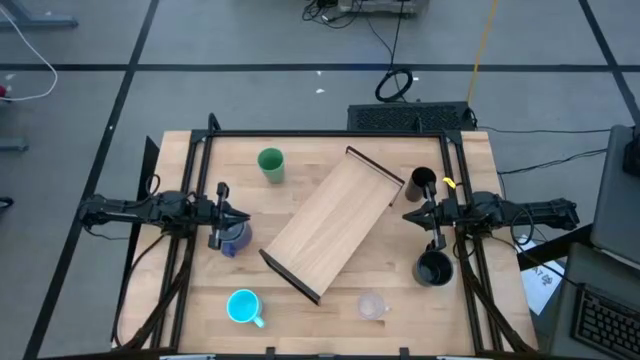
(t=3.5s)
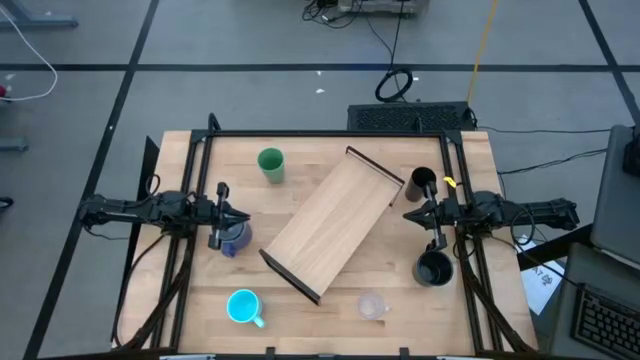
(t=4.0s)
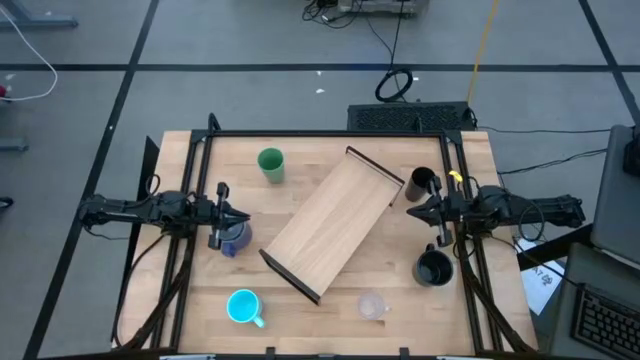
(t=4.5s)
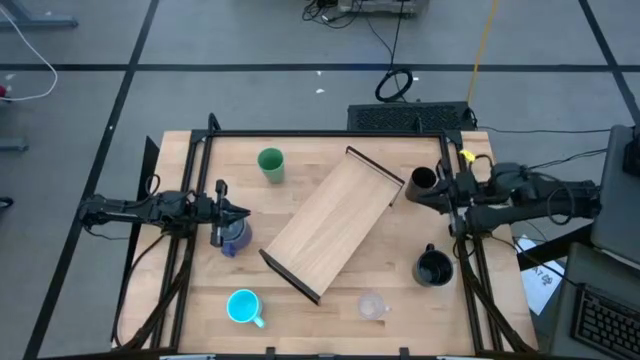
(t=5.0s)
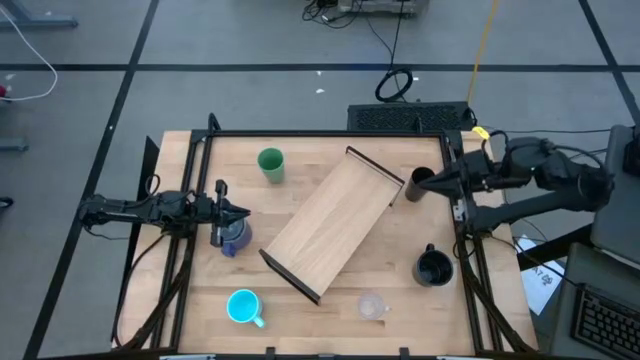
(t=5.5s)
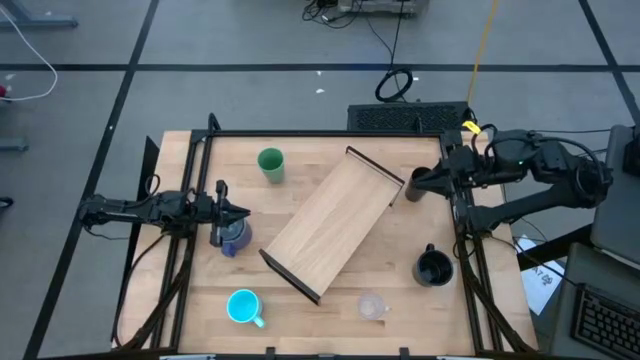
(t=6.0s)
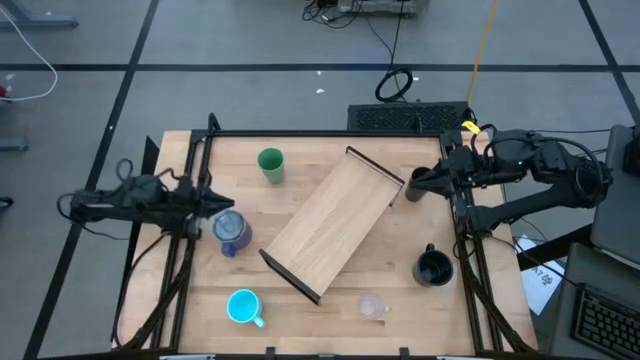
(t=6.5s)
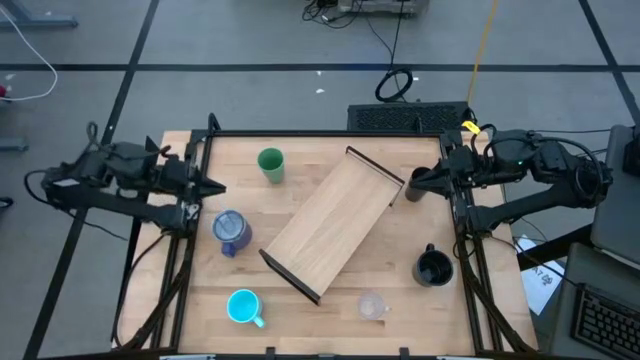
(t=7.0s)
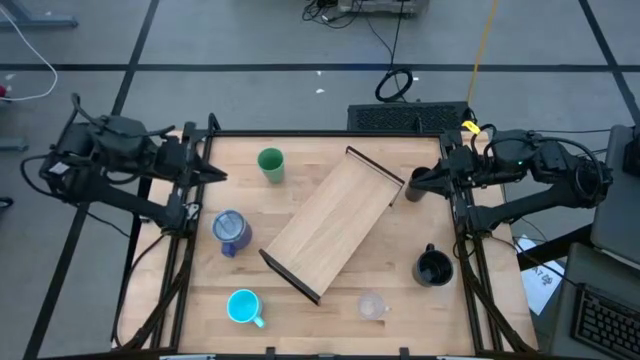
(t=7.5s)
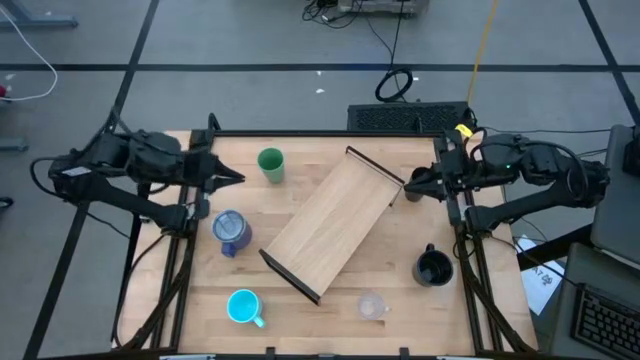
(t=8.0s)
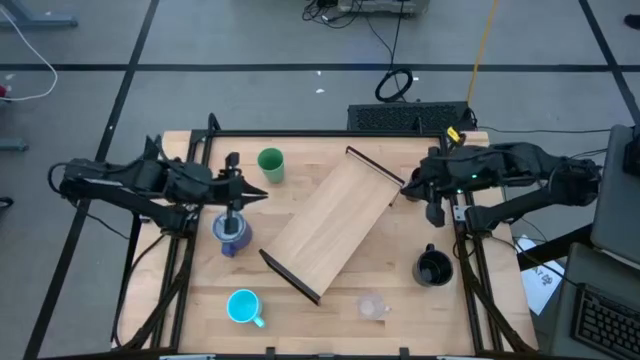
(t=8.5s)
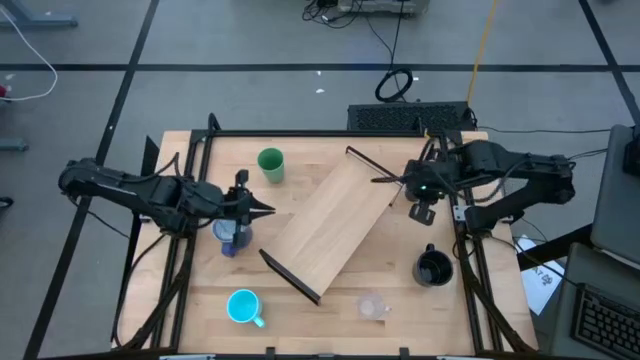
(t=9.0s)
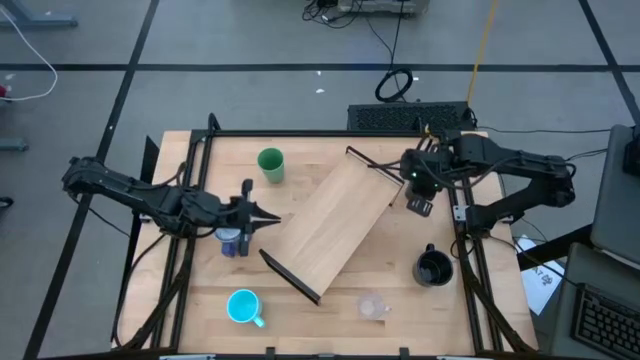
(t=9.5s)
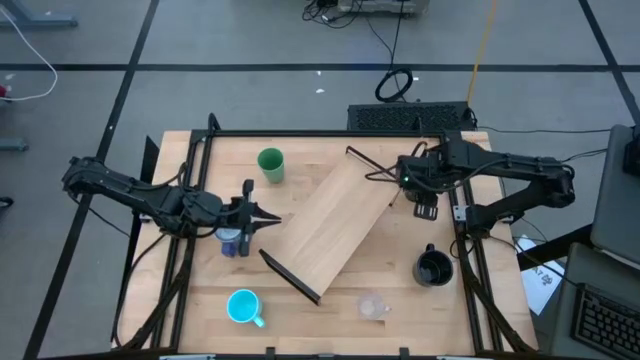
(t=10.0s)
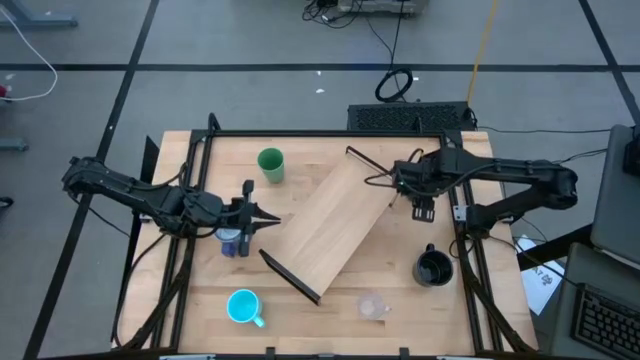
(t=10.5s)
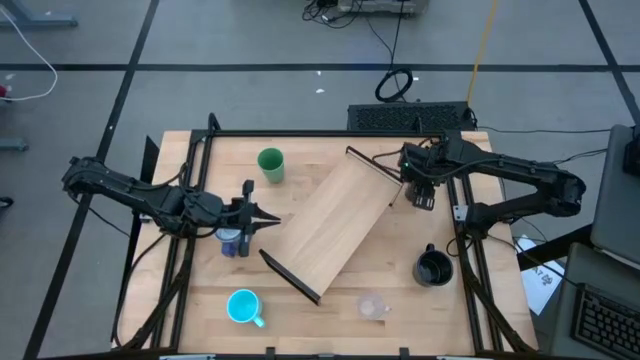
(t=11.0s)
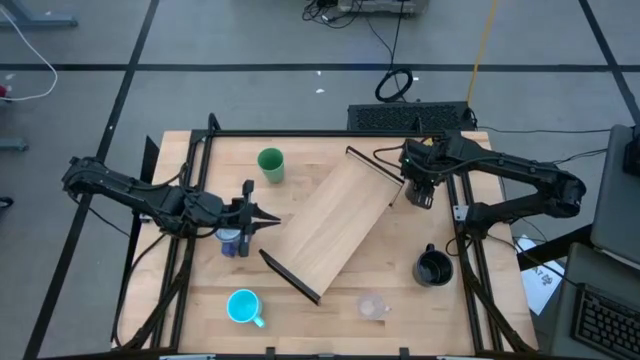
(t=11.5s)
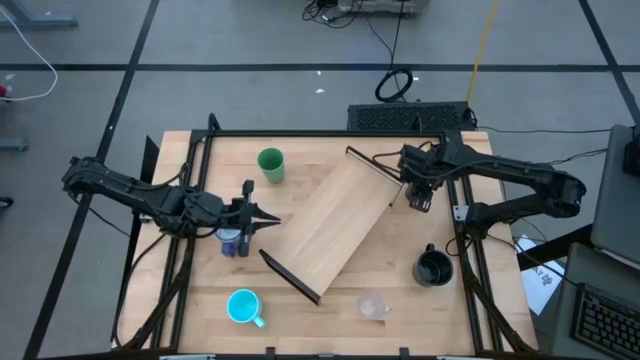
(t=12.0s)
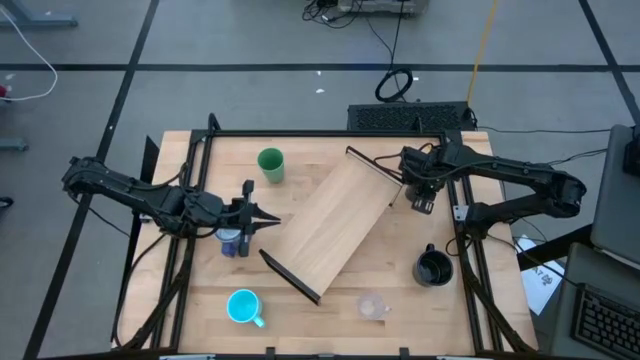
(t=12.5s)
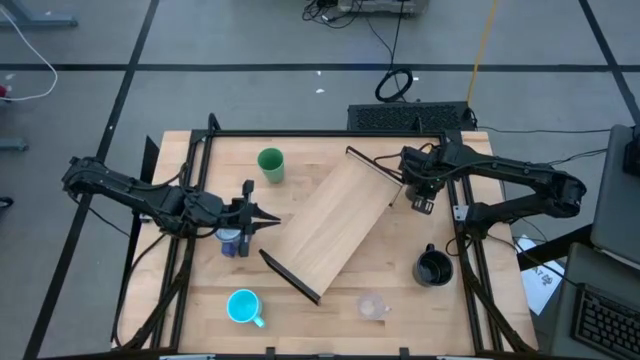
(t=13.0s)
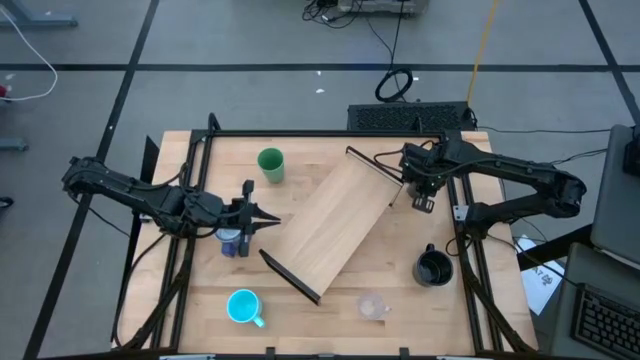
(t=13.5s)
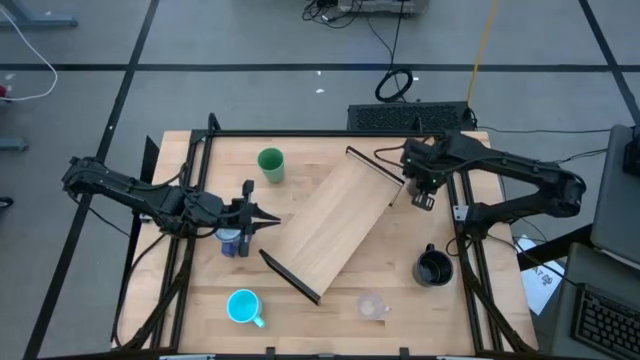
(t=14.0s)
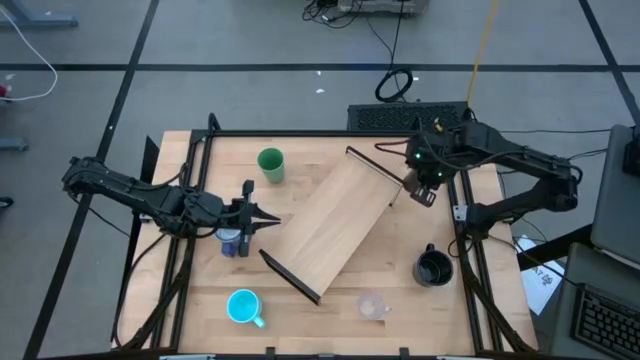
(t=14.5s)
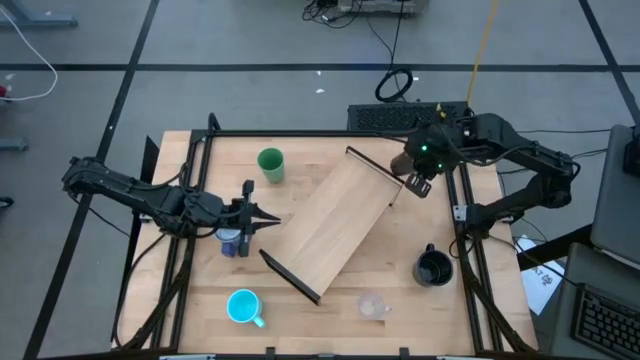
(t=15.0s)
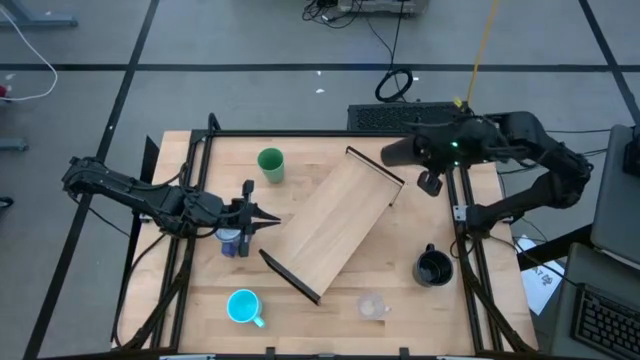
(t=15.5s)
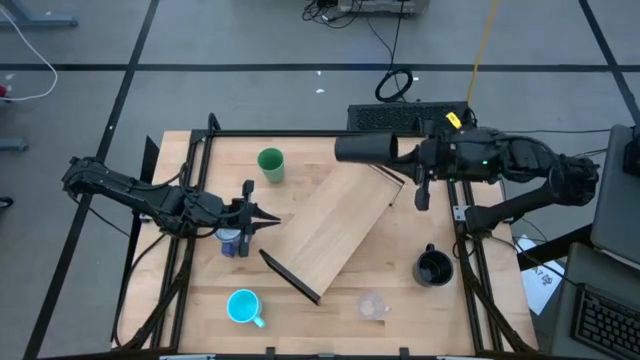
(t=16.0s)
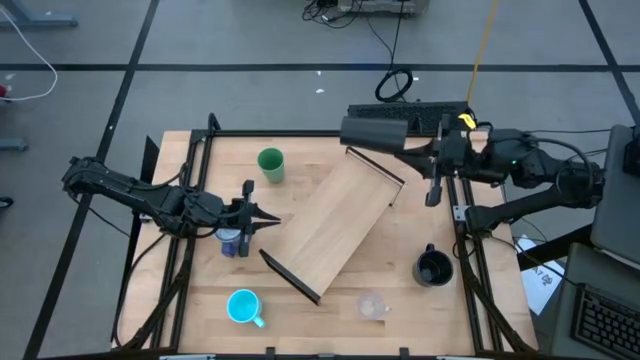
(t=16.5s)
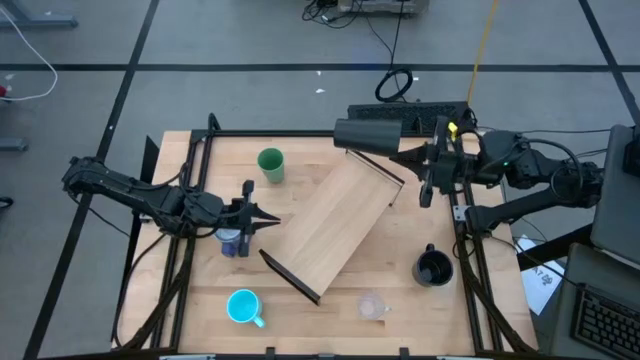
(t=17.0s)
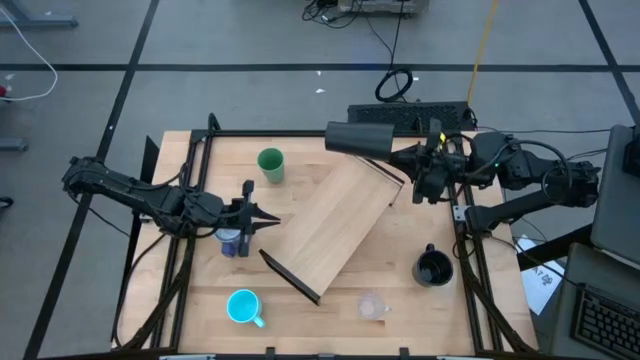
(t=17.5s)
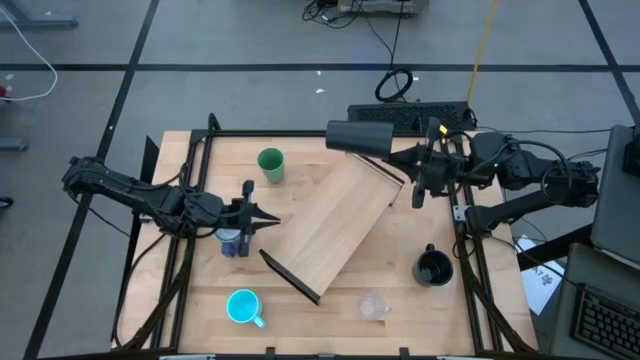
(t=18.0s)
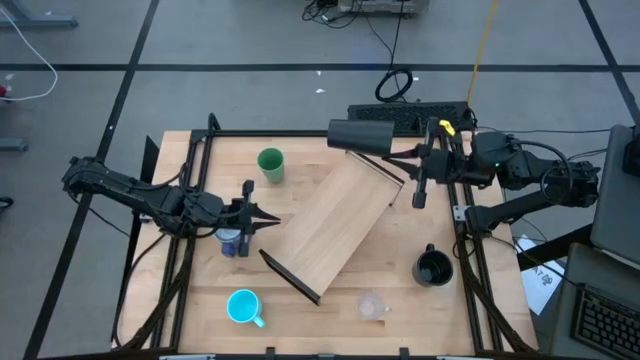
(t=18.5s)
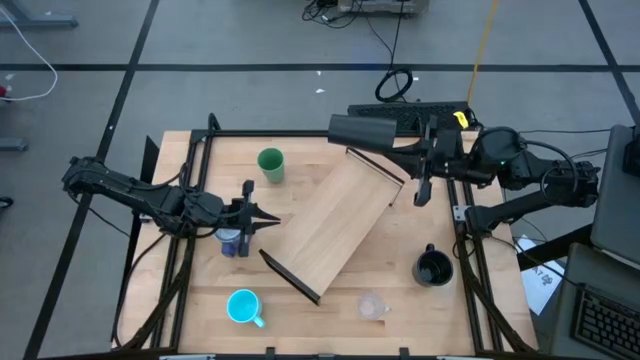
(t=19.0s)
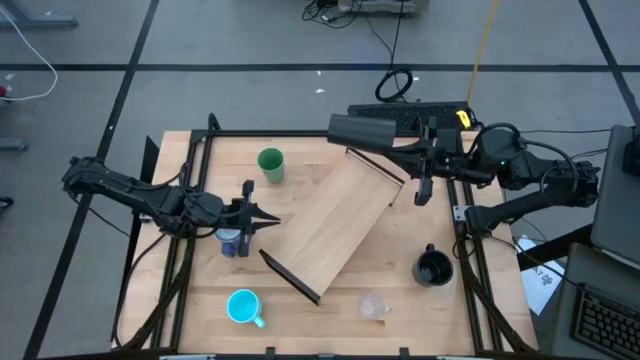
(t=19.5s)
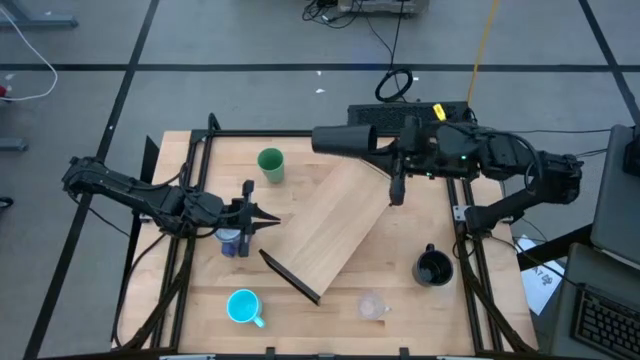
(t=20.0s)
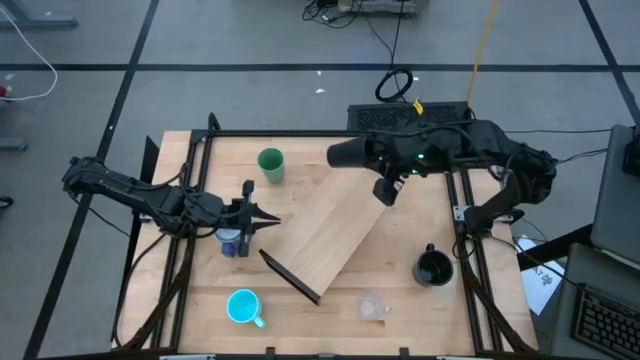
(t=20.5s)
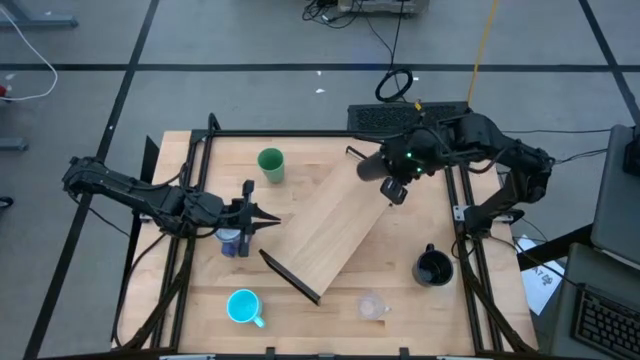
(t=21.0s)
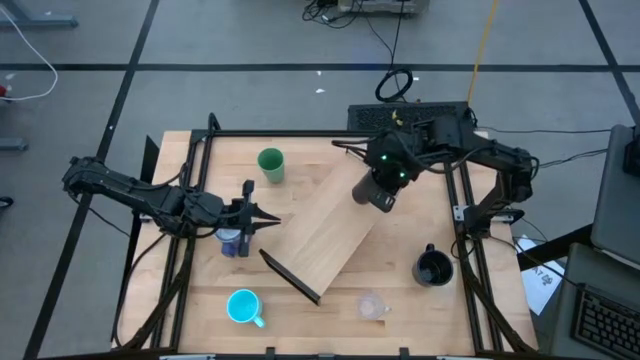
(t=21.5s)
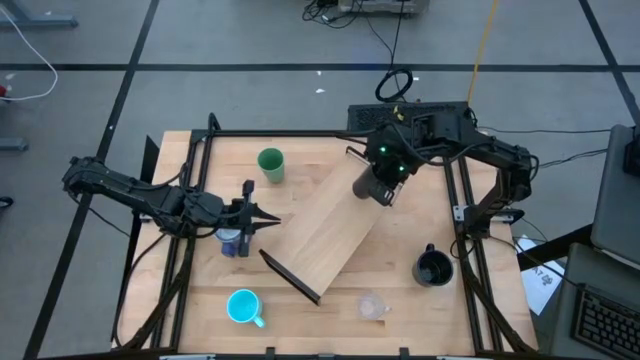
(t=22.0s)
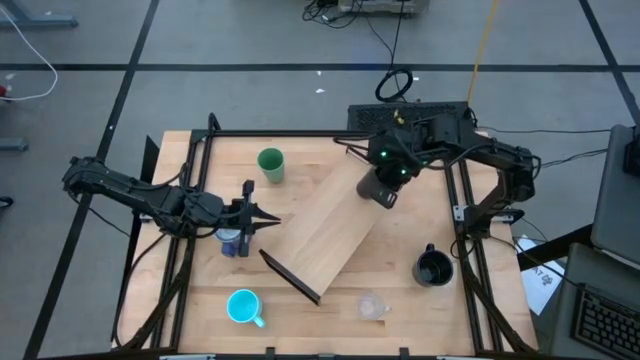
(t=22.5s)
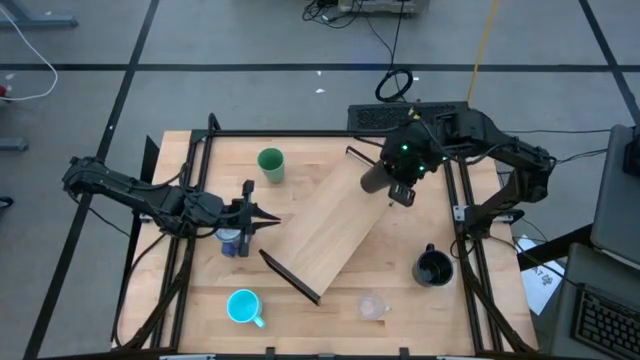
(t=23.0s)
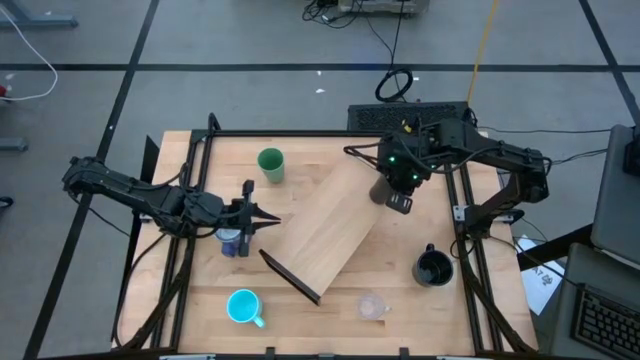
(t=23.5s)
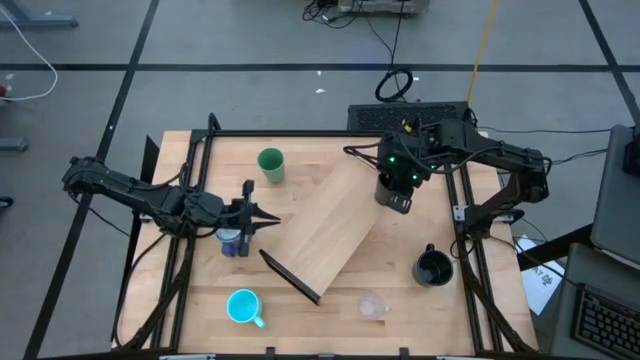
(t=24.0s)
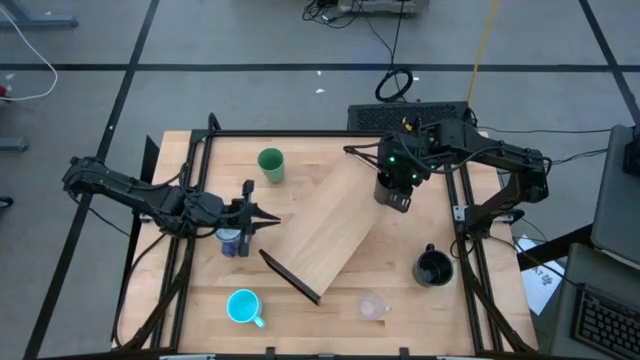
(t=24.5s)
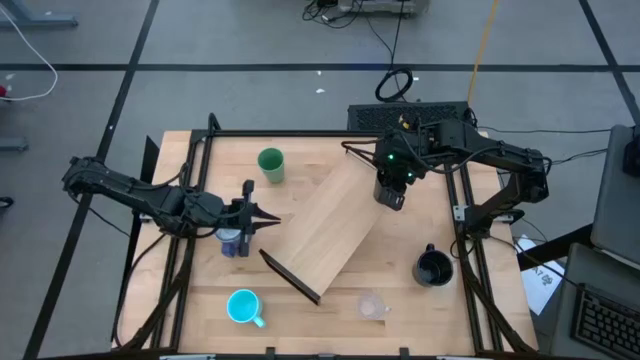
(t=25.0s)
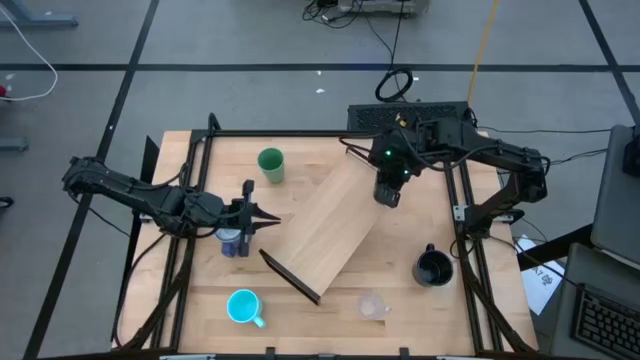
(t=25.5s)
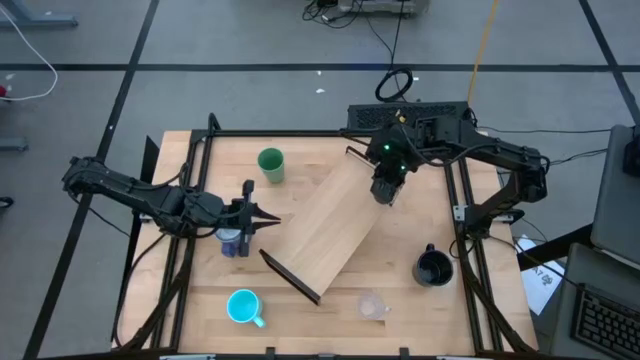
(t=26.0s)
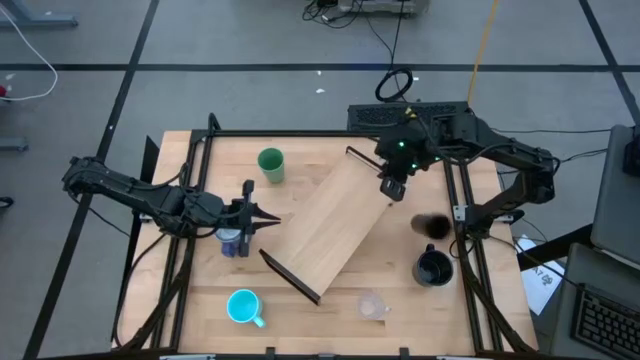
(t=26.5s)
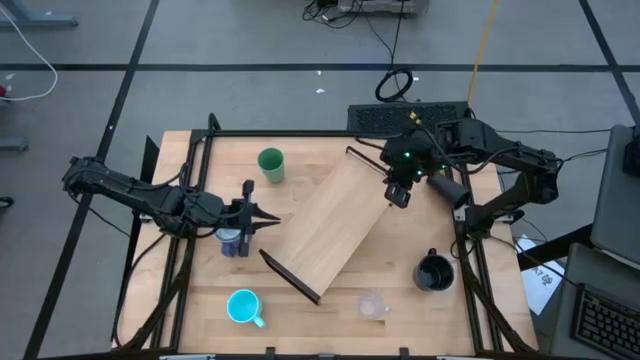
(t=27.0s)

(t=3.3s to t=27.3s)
Task: Stack small to large cups/mugs on shelf
Put the black cup on the shelf
